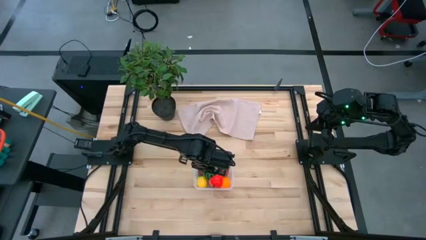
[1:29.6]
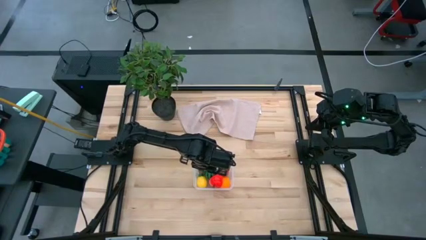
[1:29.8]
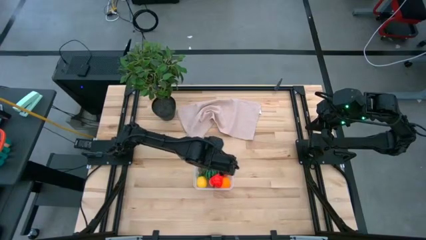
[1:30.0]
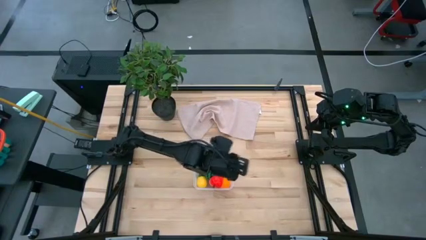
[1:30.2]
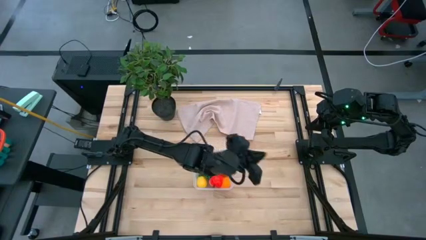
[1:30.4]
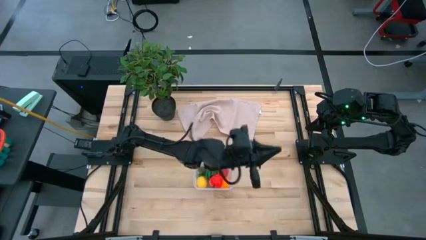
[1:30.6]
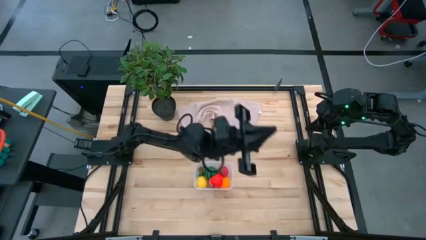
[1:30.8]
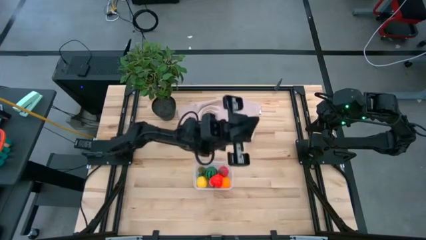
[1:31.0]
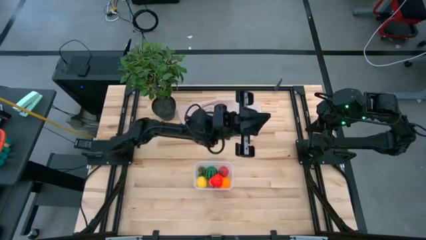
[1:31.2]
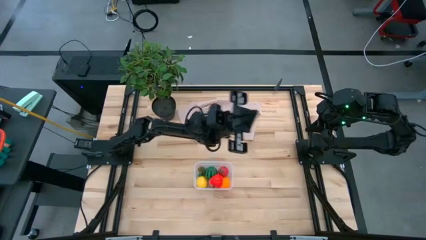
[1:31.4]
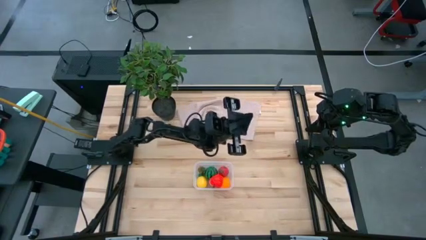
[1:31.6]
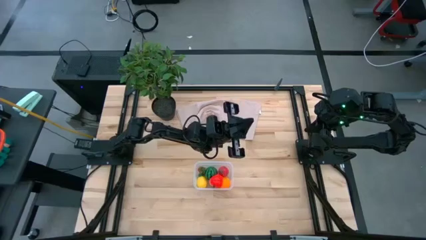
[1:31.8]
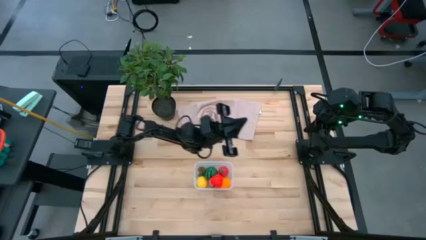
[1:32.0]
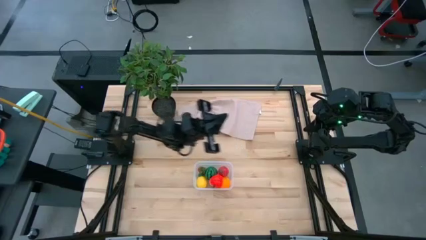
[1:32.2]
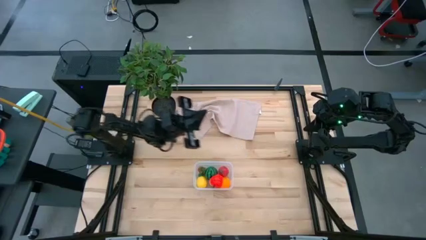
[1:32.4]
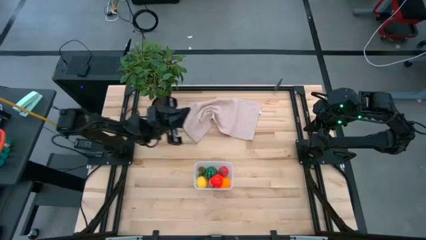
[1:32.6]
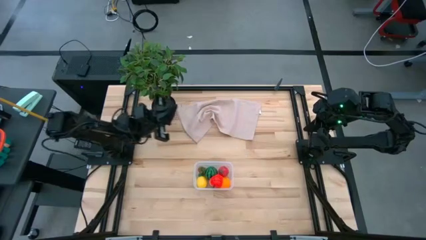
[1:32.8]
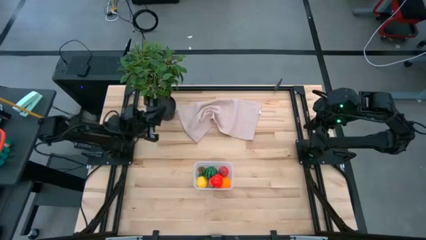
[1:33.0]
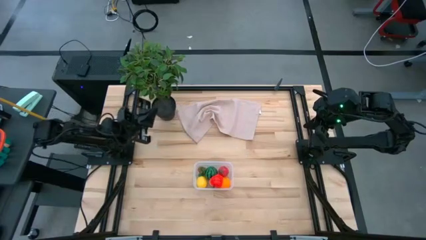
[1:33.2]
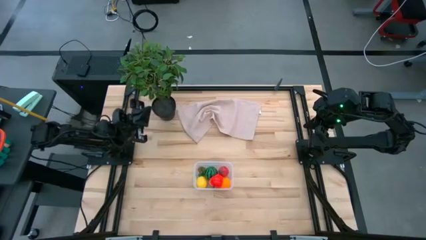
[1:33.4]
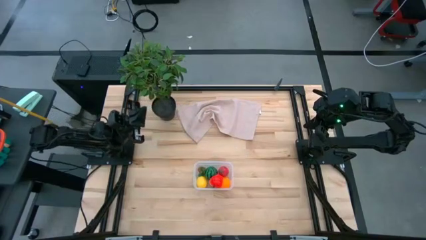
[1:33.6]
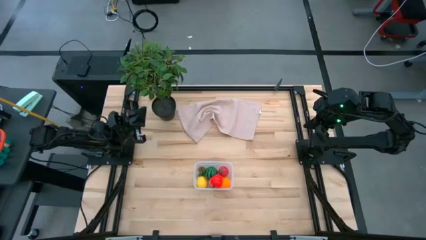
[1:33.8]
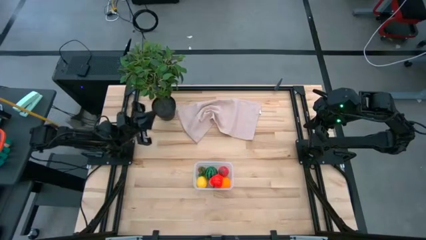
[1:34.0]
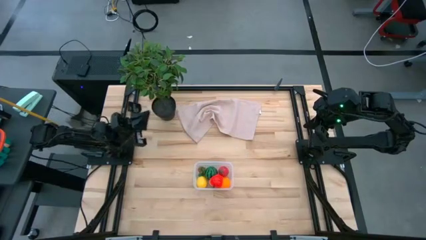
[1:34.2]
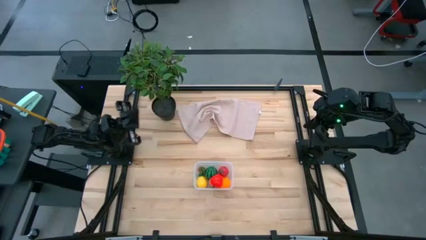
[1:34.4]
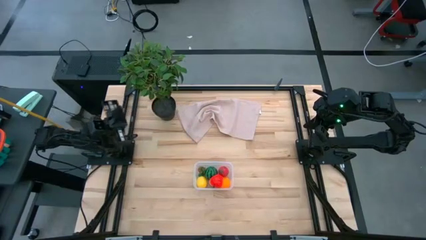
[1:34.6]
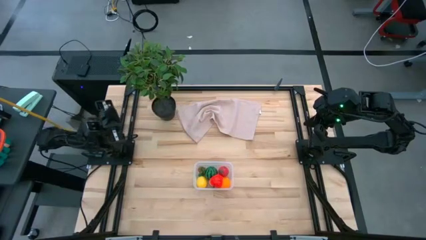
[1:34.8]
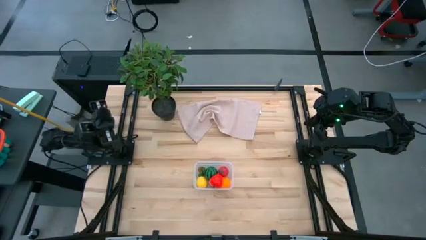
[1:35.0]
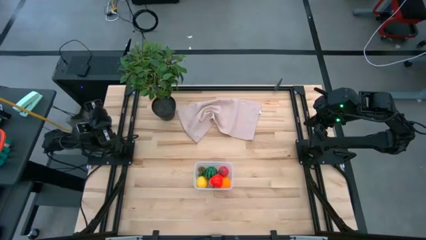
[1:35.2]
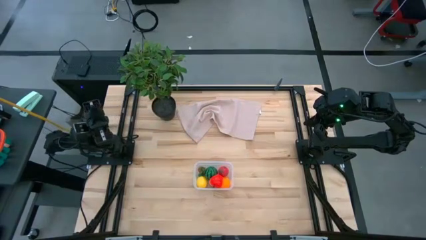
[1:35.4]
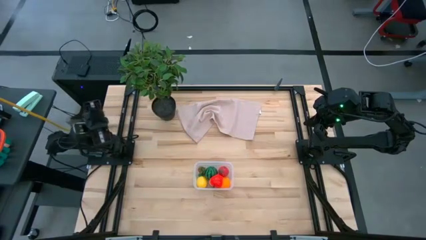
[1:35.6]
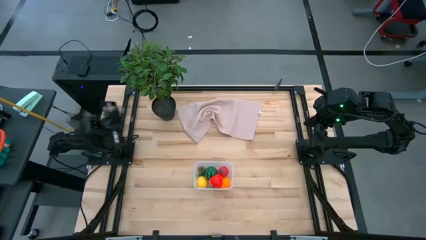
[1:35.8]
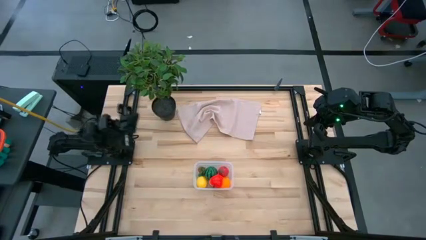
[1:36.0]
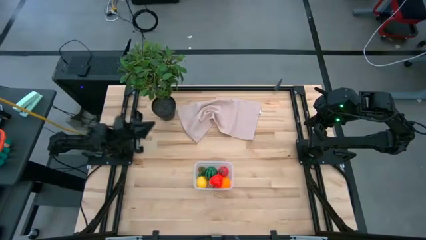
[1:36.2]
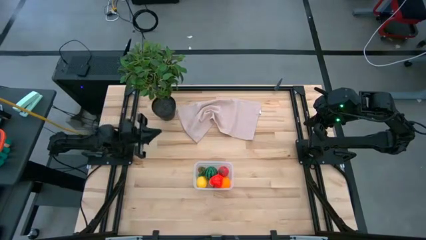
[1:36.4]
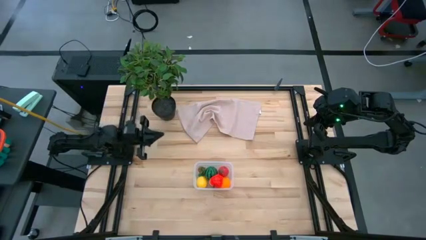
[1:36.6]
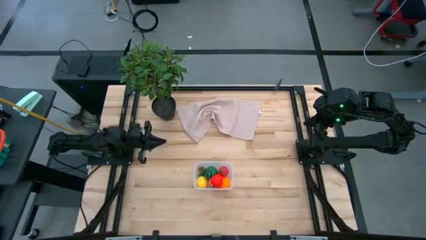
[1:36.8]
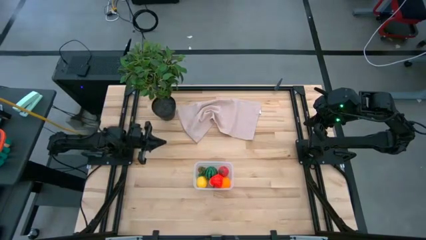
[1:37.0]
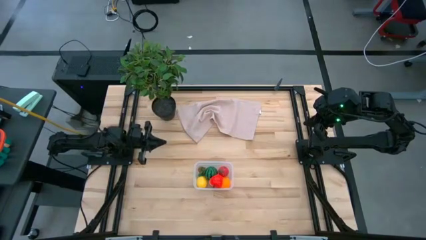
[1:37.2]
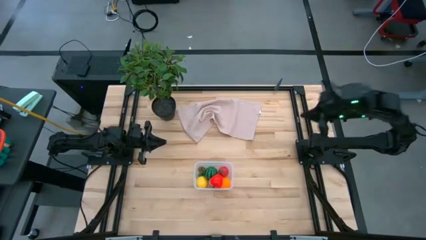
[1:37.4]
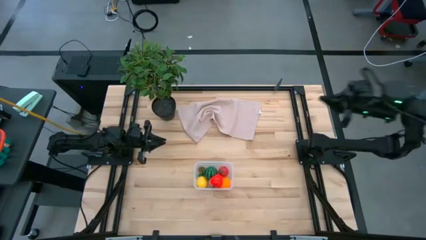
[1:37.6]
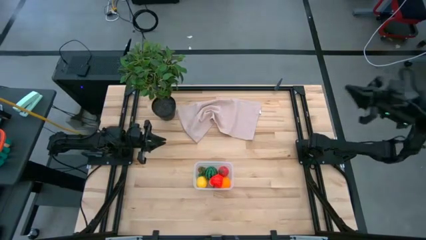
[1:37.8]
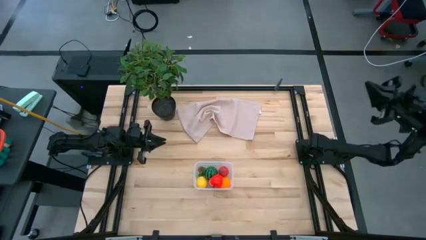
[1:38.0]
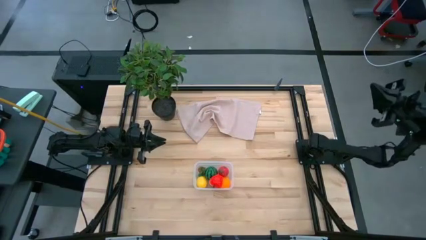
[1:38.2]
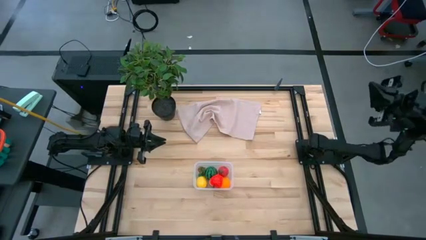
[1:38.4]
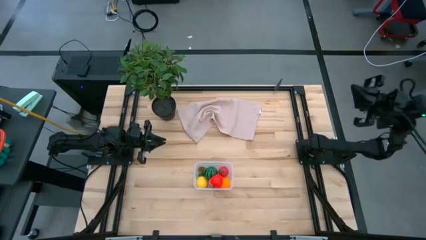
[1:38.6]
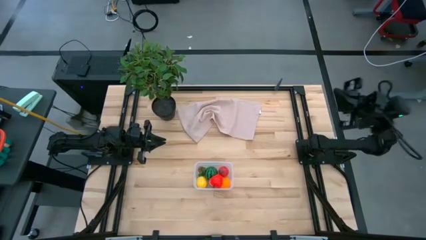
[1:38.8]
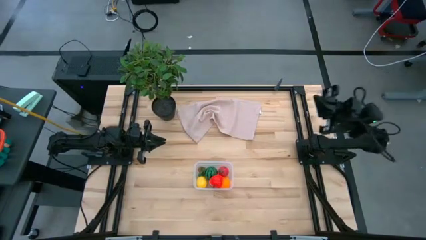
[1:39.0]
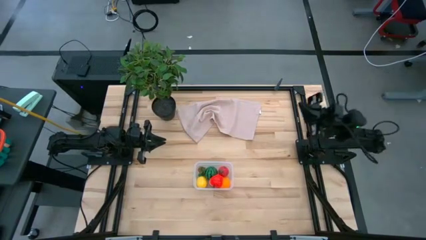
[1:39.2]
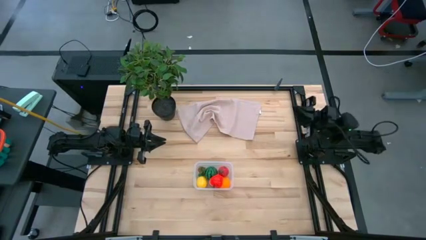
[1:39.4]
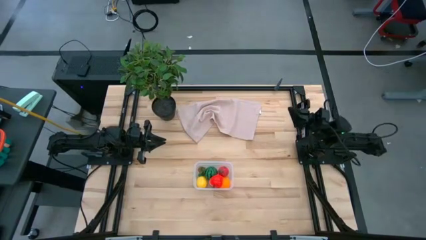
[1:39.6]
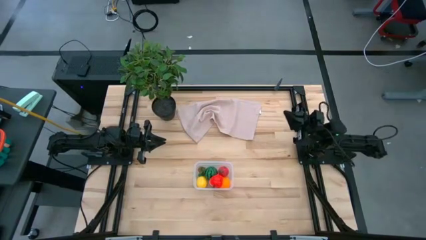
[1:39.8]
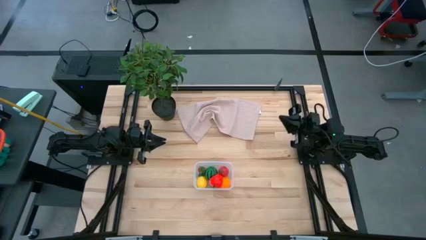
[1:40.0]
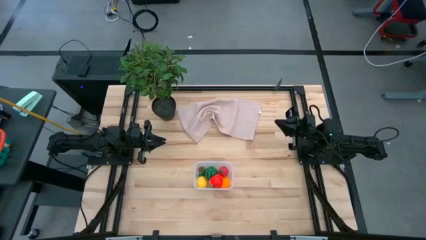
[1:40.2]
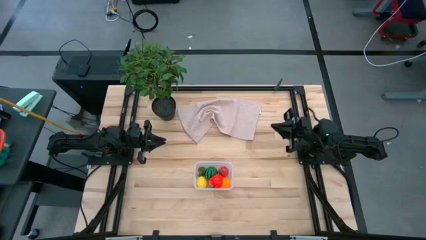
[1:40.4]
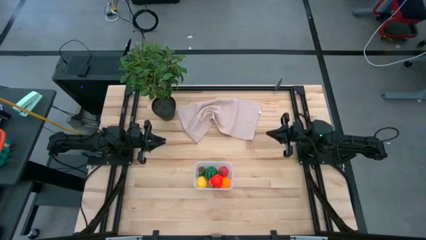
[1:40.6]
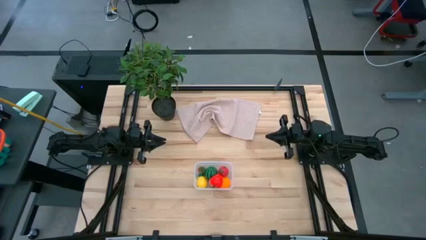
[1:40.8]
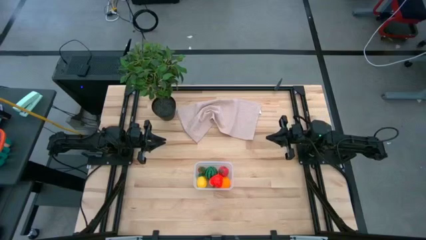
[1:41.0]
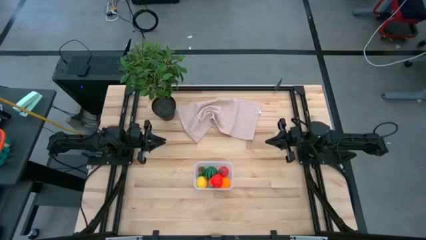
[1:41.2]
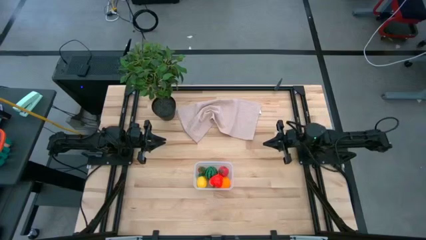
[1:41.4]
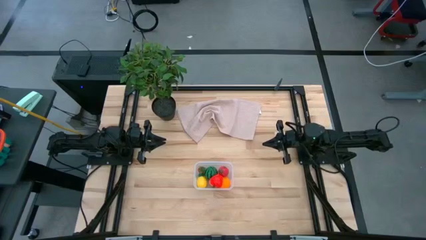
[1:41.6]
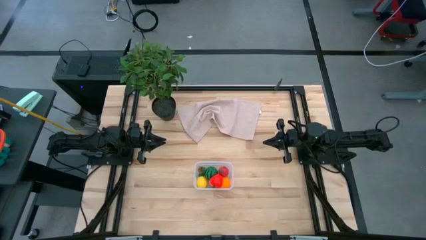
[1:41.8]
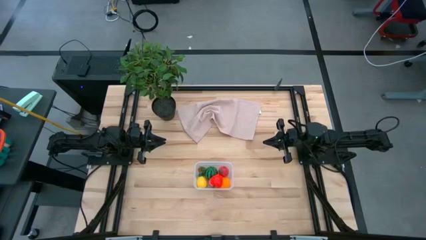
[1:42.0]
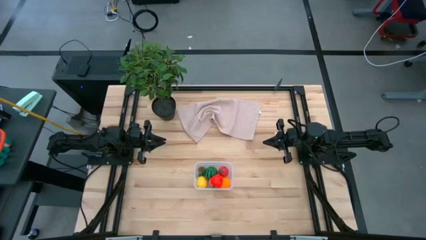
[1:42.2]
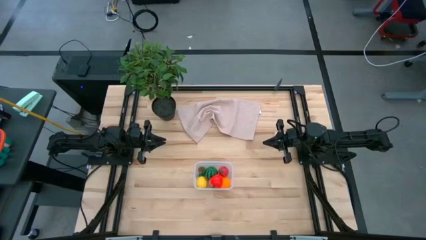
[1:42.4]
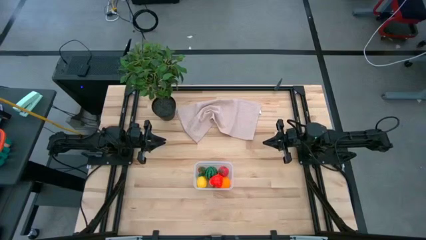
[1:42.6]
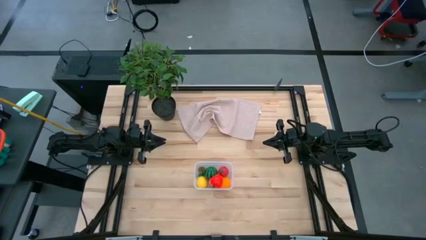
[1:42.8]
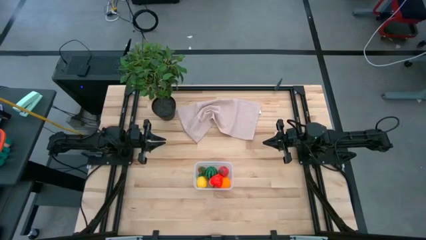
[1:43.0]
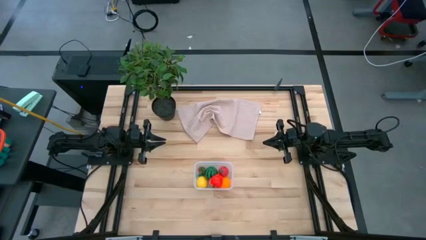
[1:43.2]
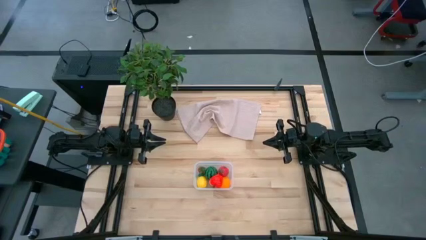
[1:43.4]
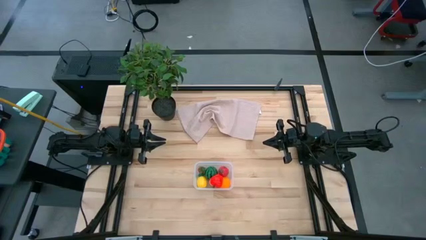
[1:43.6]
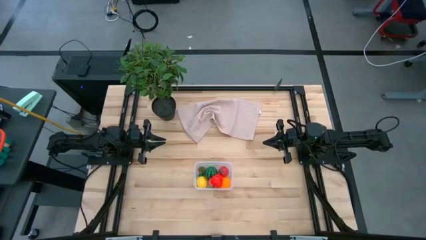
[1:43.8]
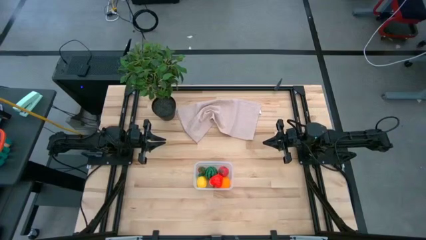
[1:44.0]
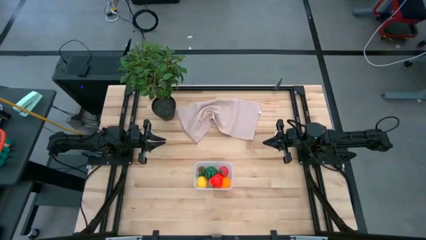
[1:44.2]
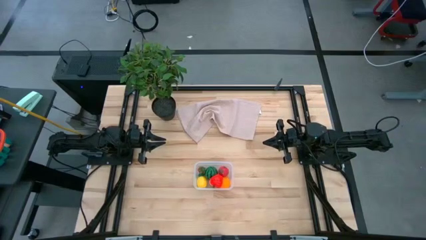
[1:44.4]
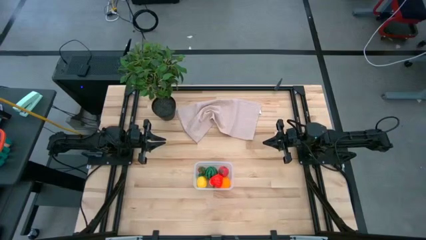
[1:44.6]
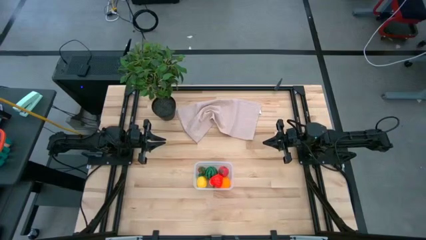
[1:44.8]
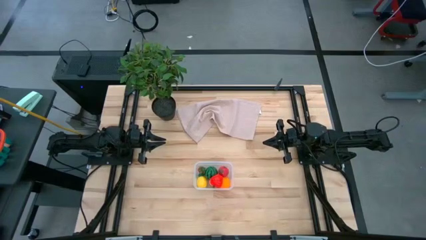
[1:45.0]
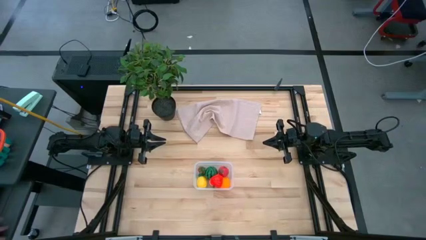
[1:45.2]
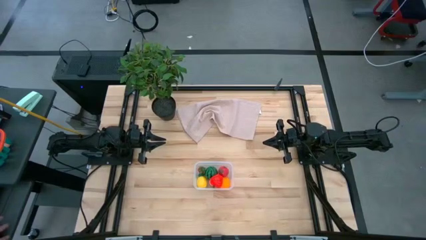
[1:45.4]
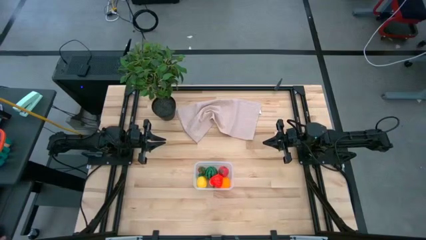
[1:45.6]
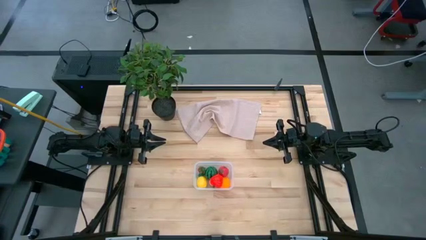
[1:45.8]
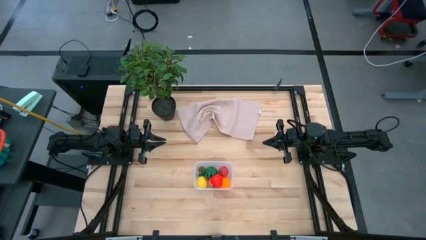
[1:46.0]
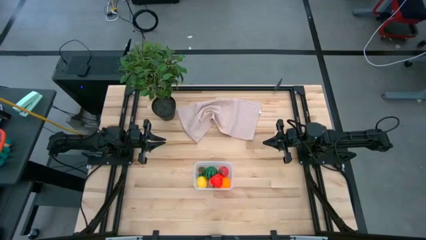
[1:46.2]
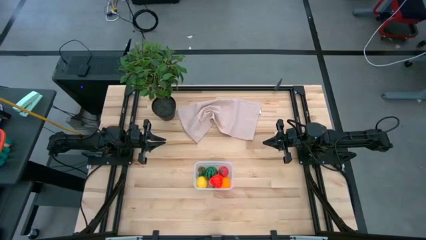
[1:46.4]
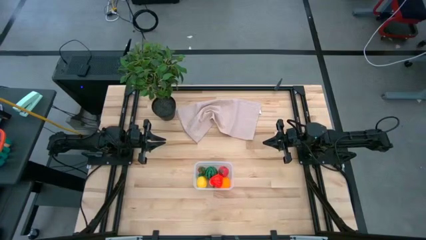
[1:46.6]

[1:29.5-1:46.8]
Task: Pick and placing Produce into tupperware
Return to Home Position
